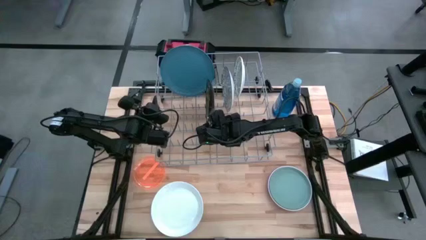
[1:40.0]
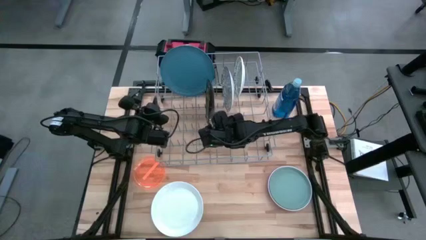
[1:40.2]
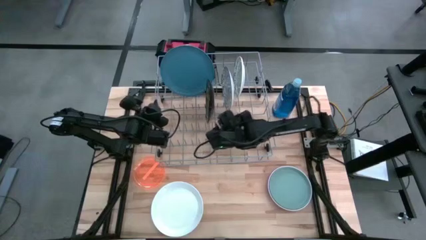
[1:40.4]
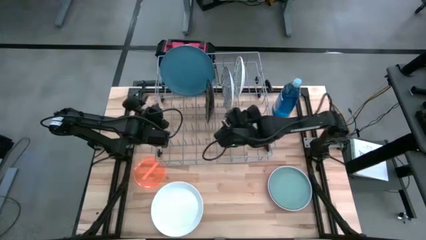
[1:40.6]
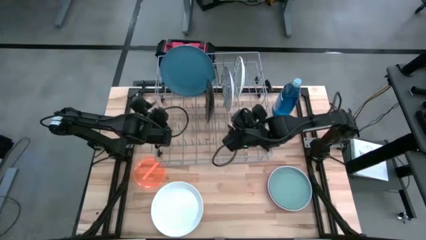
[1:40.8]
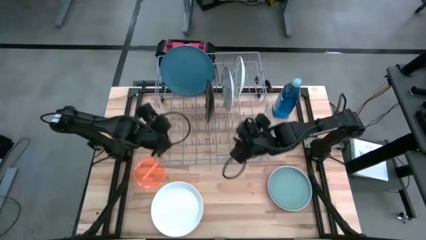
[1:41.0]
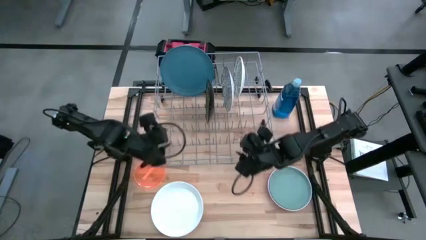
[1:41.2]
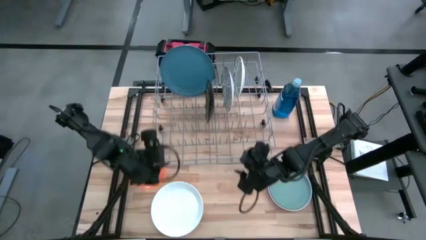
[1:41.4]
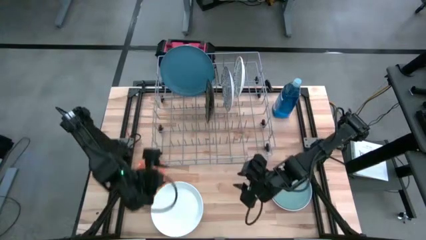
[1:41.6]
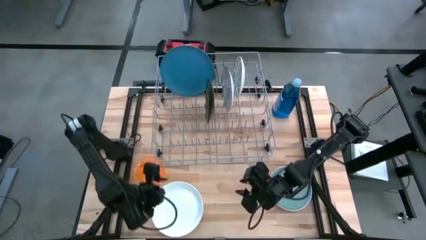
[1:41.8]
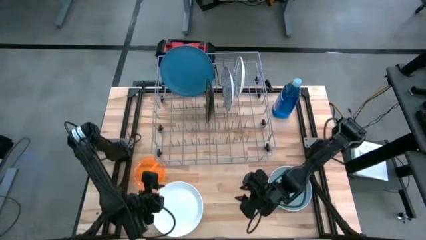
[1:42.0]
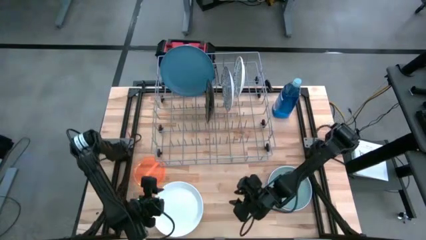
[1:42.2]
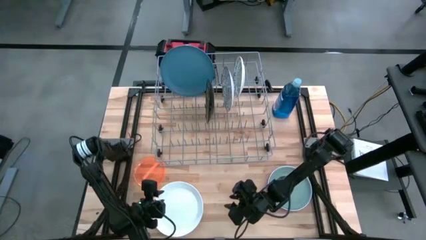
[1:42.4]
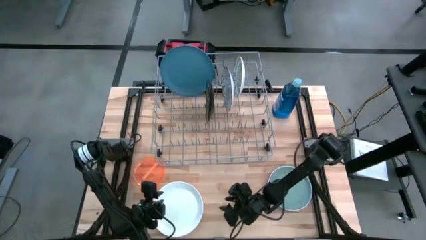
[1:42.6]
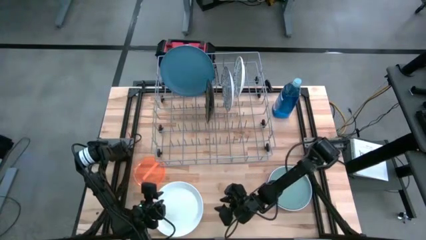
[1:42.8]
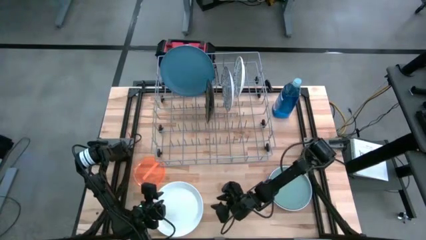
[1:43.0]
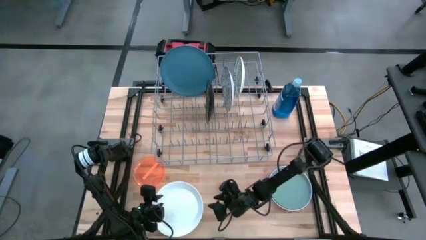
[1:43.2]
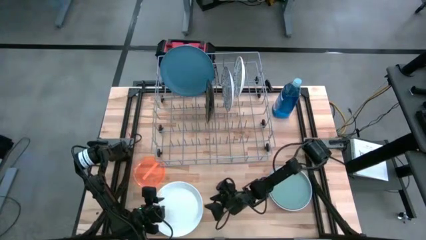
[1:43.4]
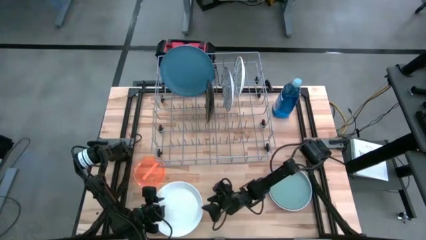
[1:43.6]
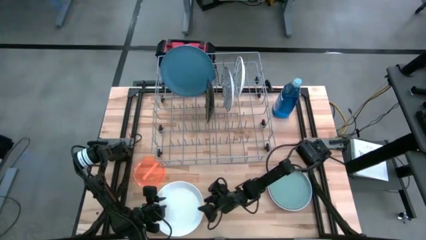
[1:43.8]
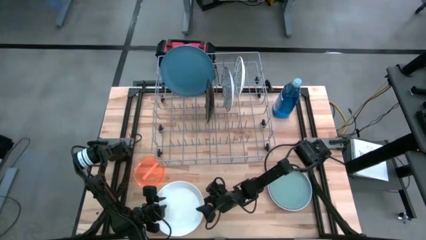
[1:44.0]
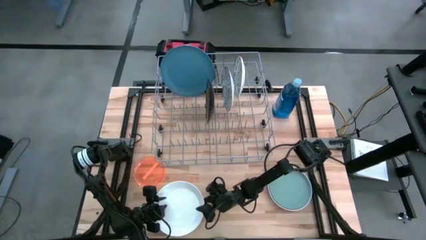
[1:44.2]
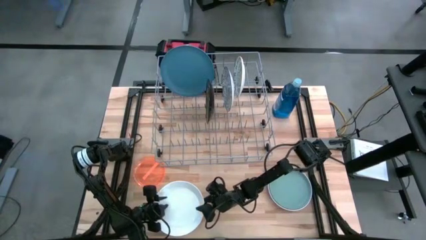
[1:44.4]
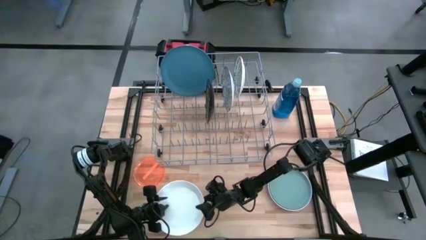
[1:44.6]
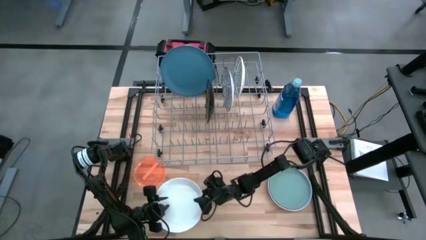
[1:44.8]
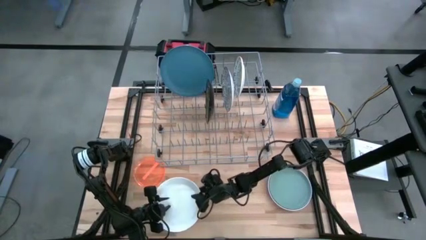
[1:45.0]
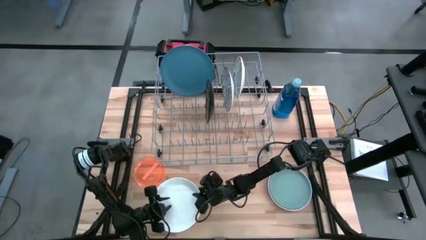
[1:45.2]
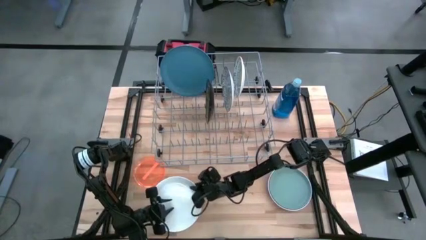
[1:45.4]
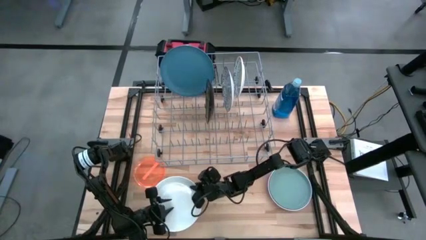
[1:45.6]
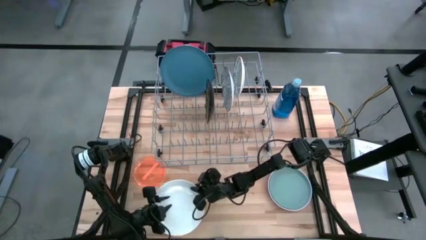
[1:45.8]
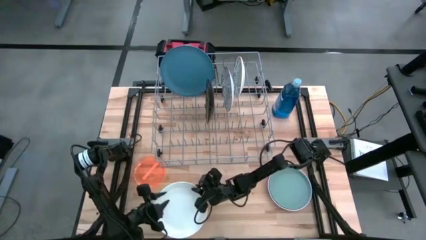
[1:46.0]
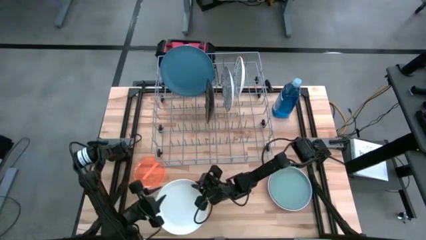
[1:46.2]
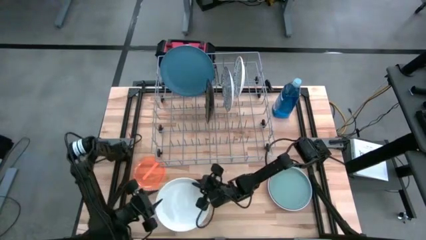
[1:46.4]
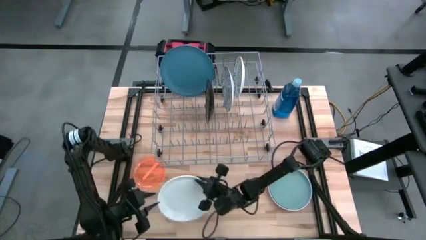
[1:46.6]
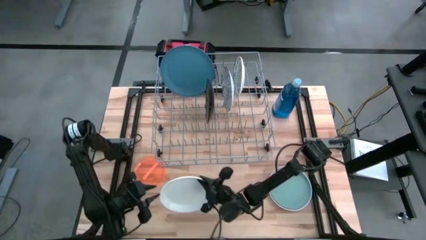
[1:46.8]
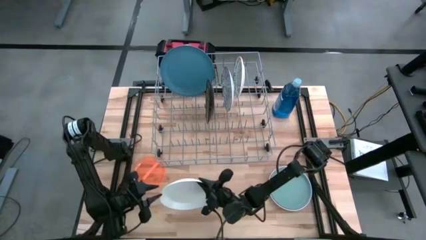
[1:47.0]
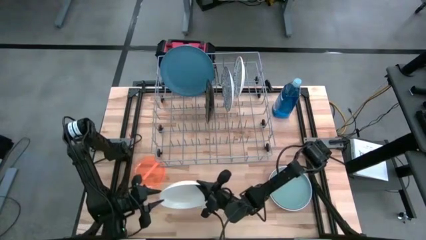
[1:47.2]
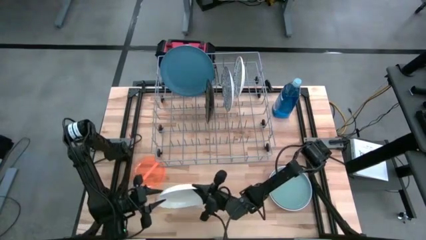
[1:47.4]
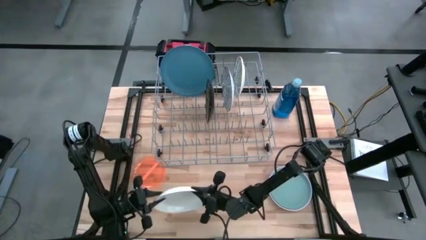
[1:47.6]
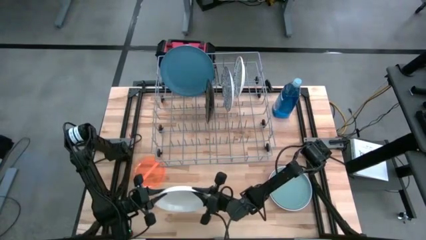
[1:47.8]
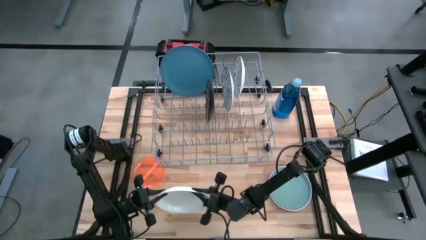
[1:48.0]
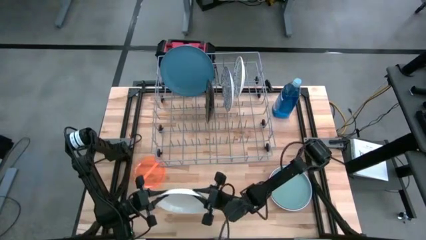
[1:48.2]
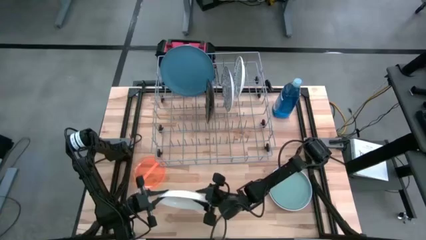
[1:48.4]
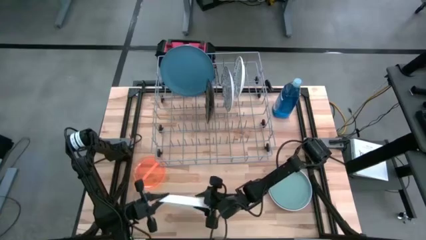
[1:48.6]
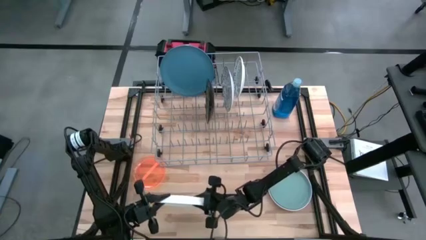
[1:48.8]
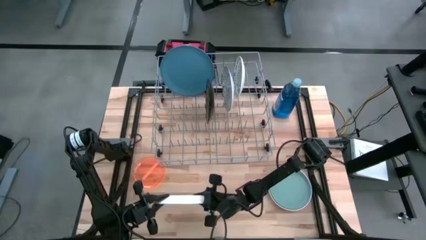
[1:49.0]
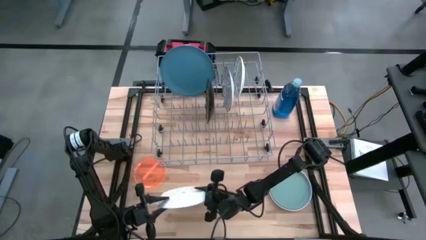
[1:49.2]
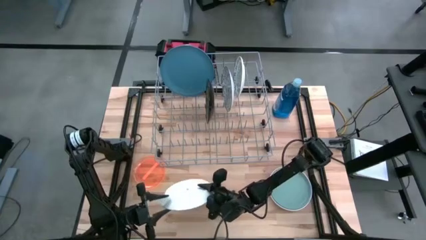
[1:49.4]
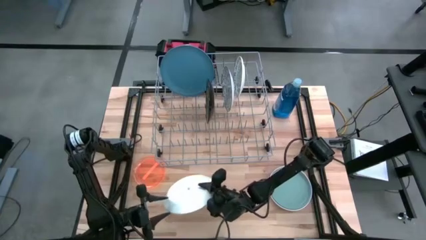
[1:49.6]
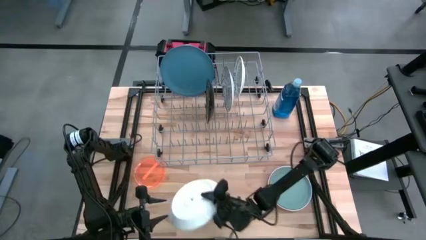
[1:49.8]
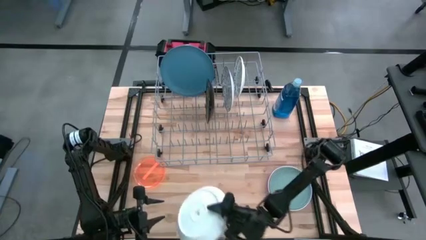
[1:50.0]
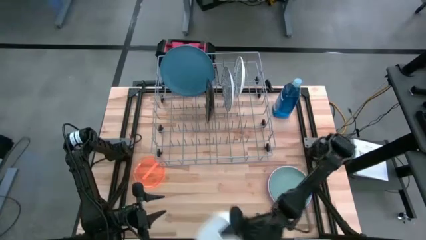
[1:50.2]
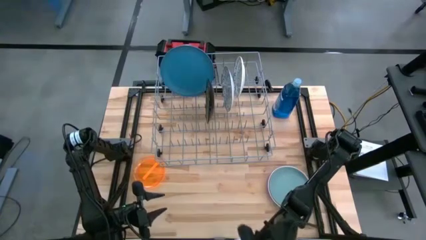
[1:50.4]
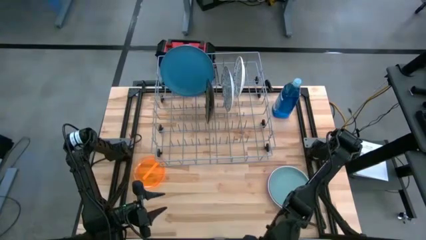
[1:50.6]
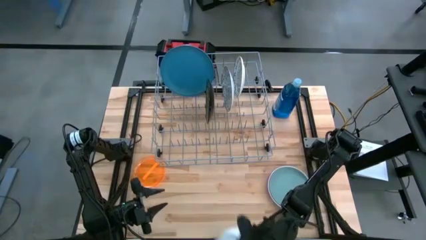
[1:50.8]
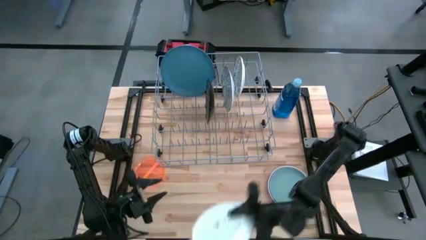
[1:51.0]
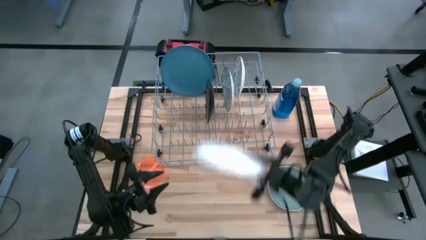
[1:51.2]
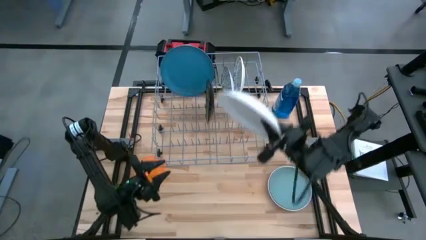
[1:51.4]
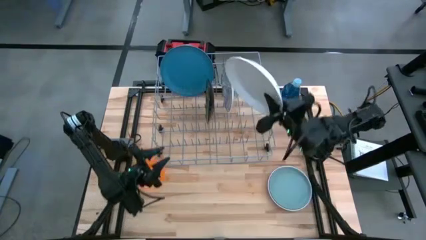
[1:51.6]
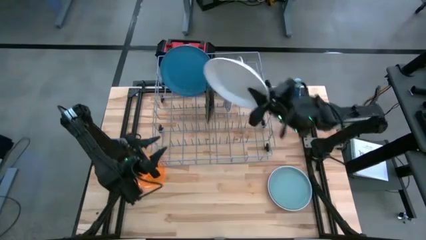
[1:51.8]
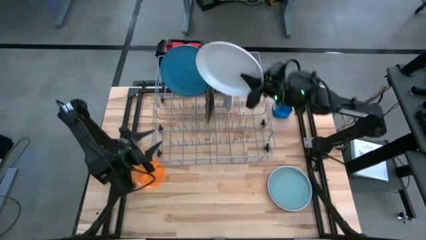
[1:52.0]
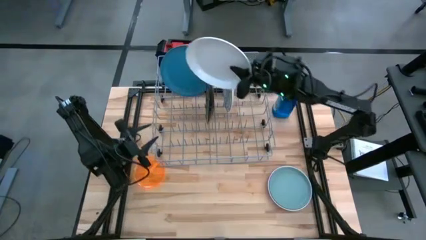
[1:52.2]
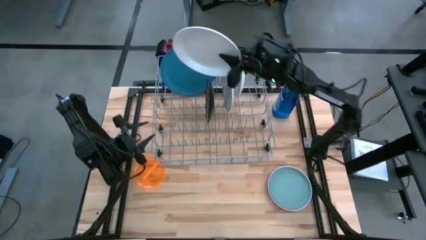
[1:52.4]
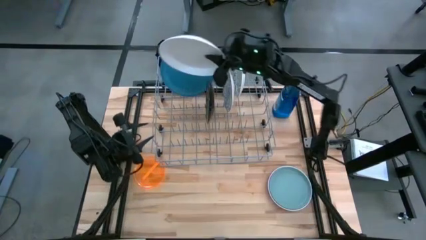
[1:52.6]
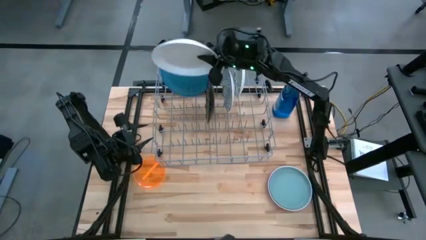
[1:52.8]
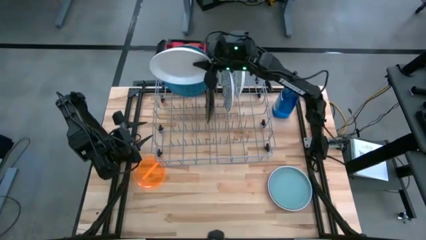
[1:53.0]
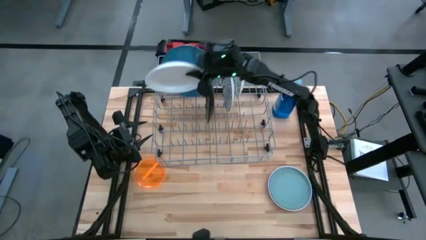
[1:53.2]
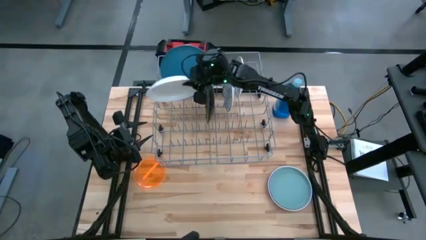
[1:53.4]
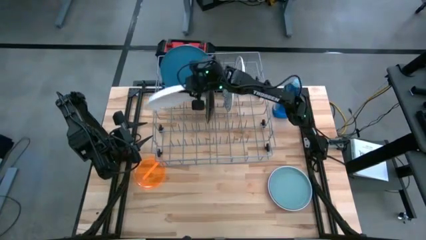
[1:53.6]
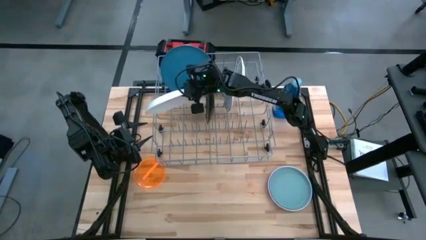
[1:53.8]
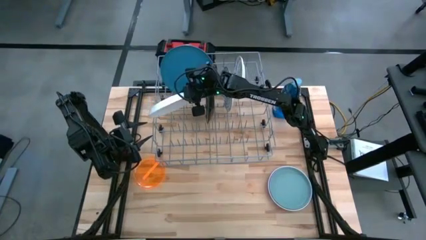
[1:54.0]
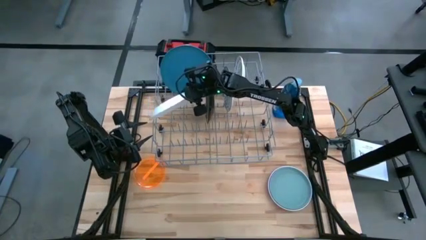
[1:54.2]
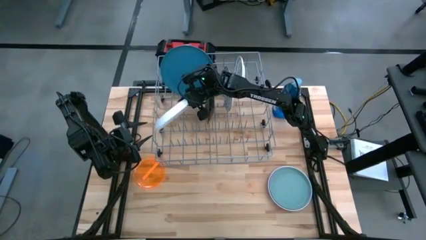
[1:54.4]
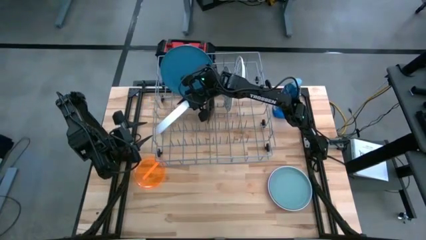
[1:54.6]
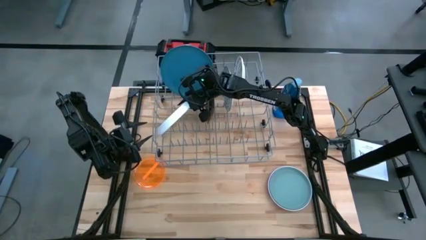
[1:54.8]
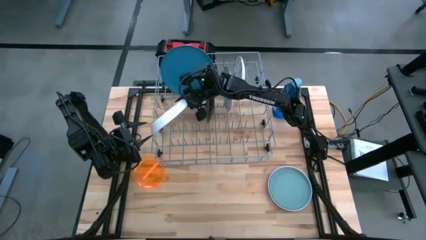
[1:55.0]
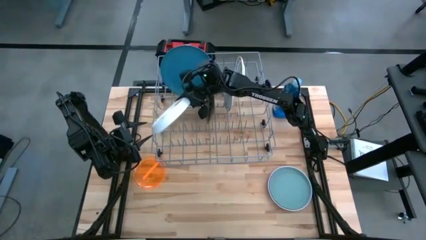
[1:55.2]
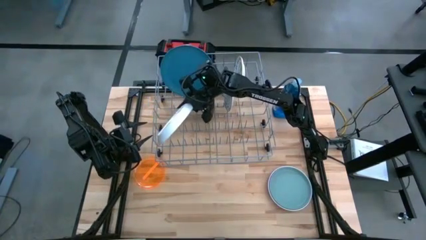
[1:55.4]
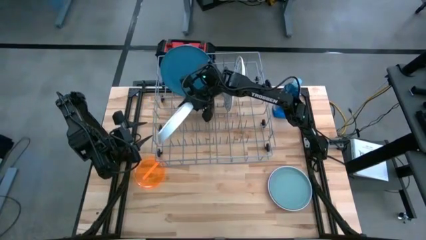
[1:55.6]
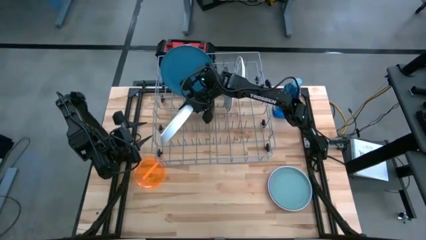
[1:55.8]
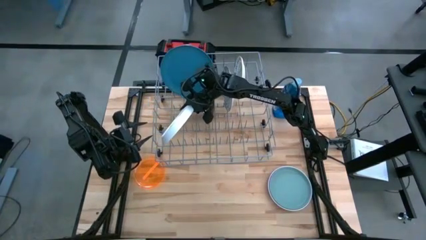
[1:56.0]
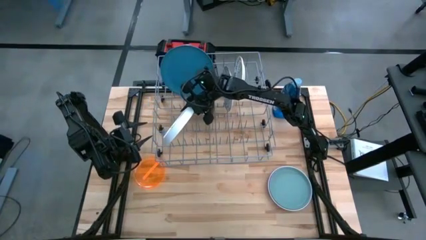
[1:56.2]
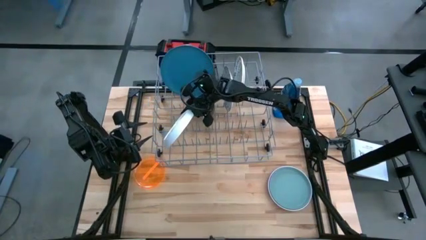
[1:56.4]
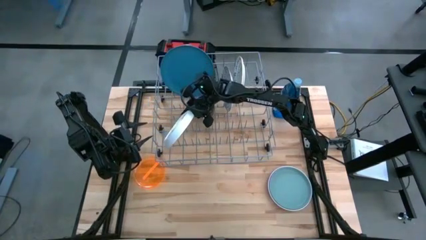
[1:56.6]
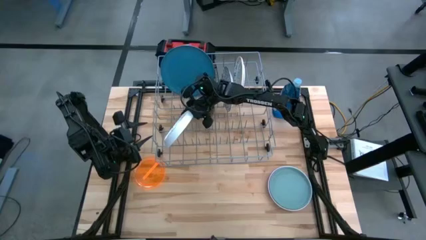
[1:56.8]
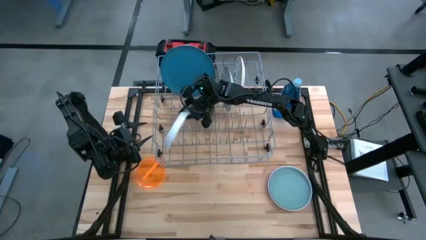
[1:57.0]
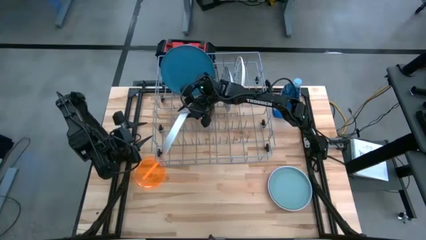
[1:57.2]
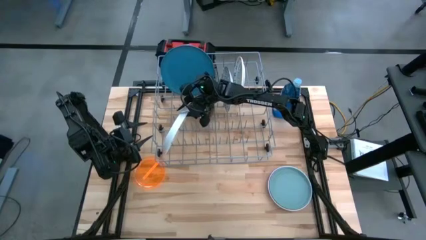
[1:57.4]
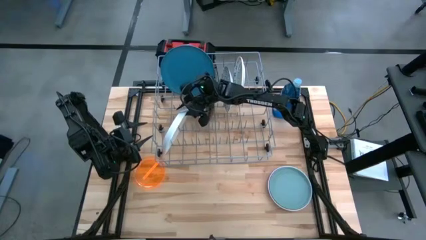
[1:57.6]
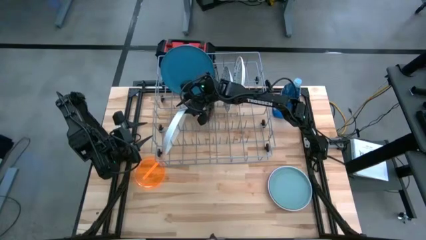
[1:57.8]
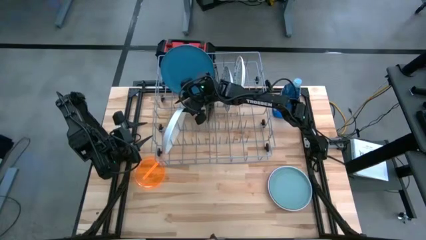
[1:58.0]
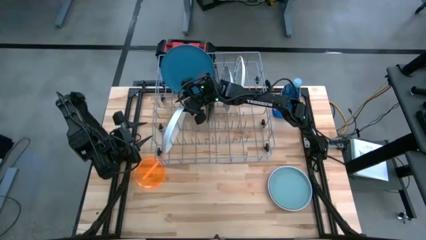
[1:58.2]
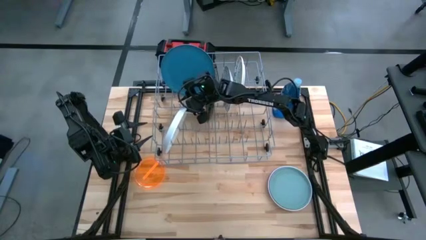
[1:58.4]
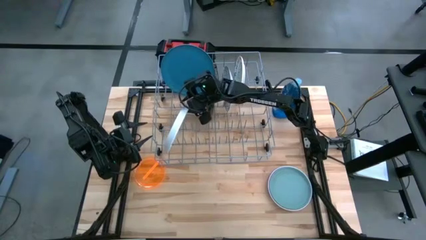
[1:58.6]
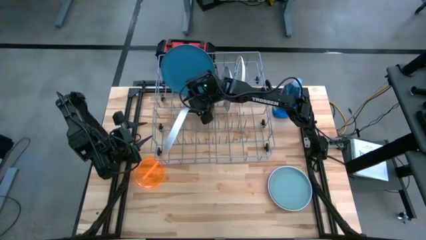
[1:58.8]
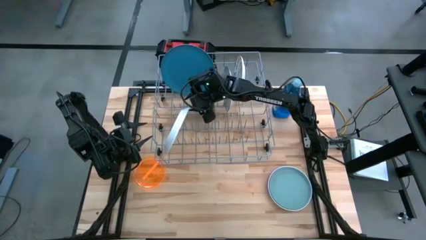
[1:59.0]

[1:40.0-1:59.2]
Task: Sort dishes
Put the white plate in the dish rack
